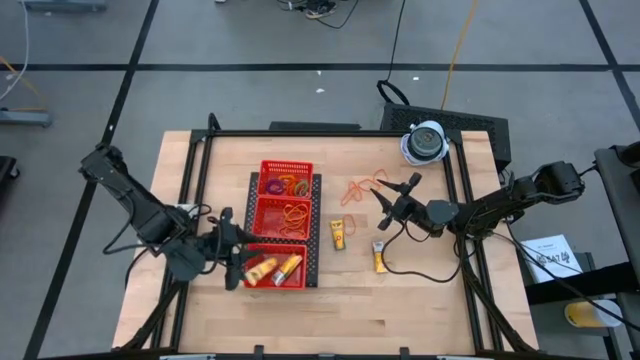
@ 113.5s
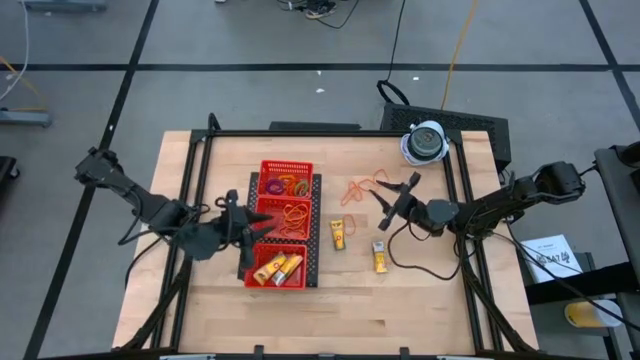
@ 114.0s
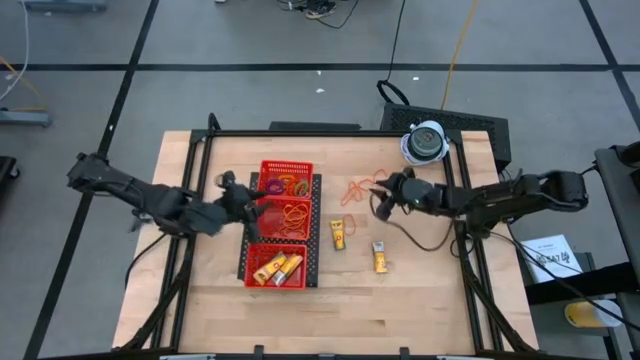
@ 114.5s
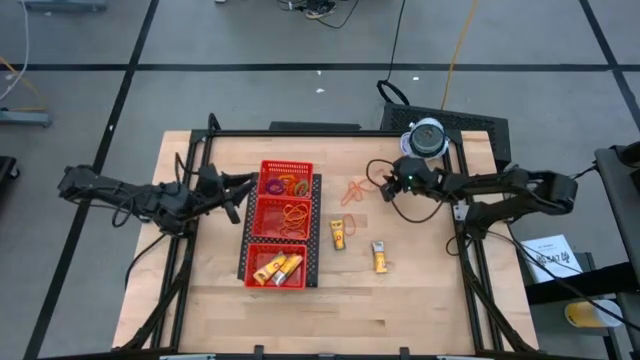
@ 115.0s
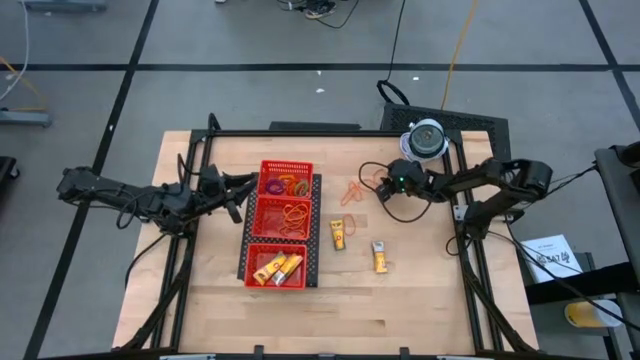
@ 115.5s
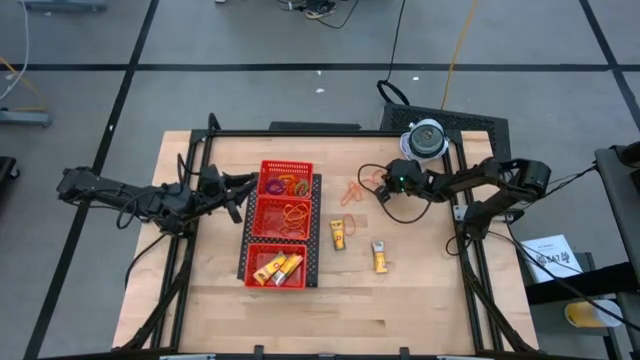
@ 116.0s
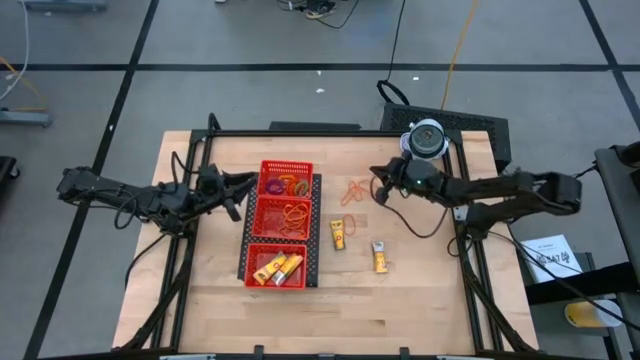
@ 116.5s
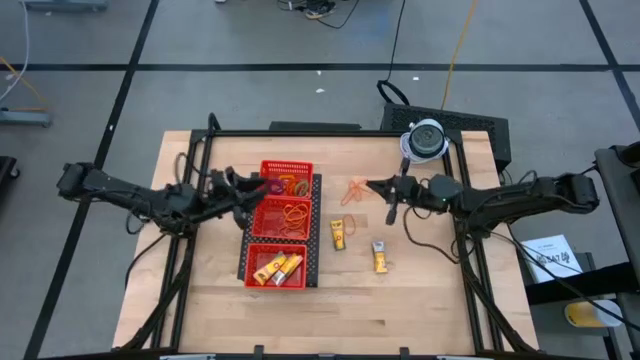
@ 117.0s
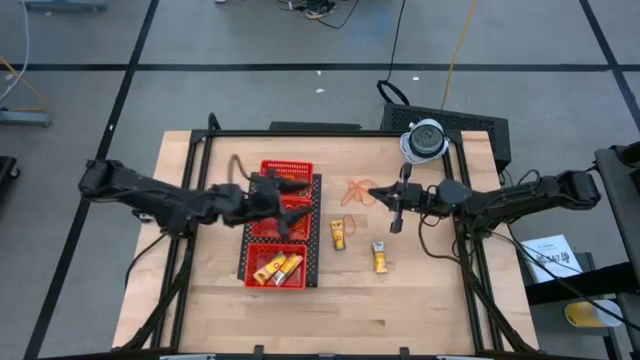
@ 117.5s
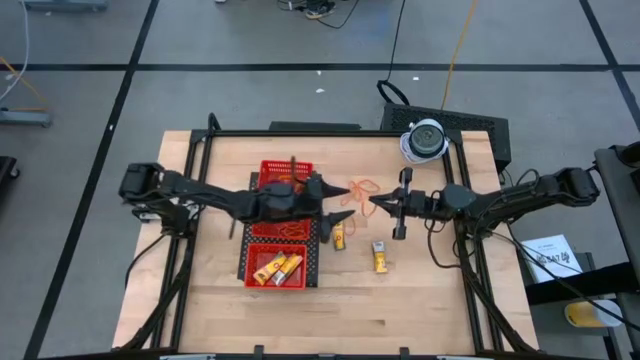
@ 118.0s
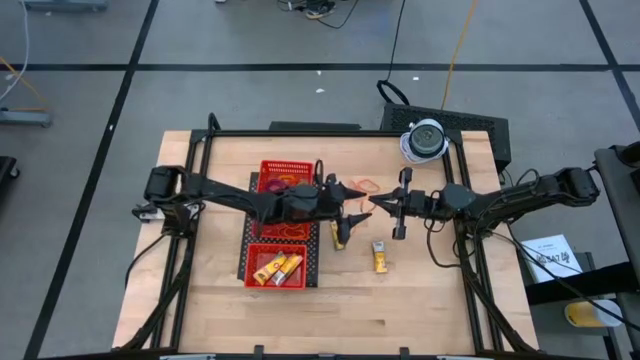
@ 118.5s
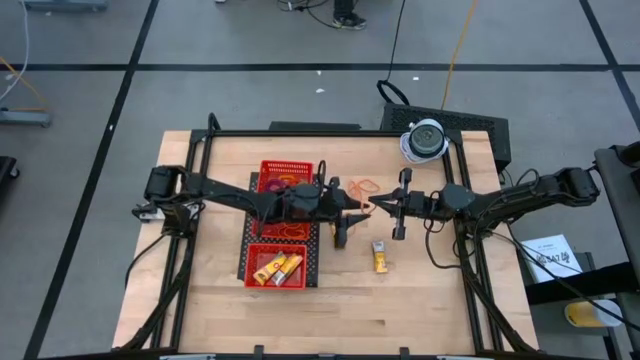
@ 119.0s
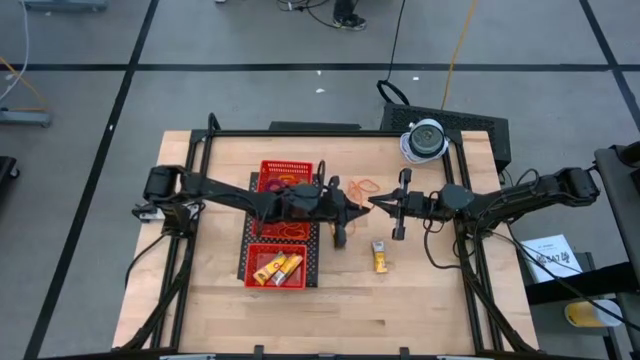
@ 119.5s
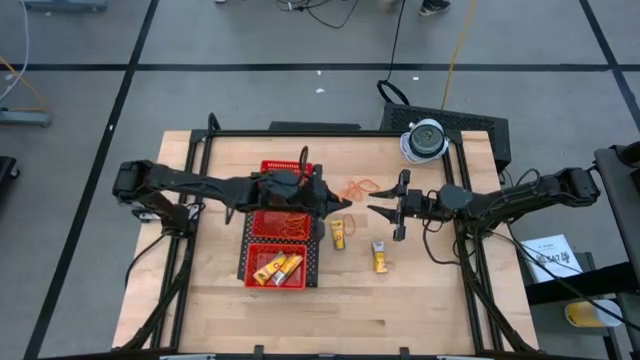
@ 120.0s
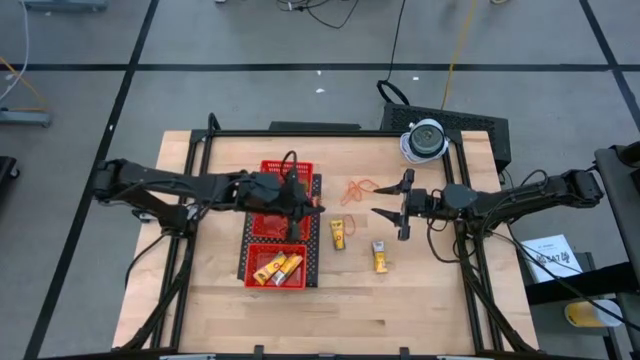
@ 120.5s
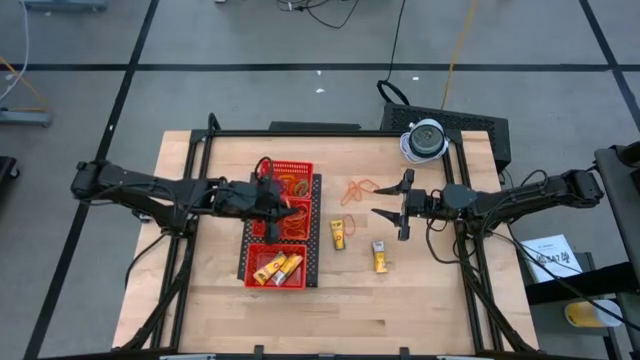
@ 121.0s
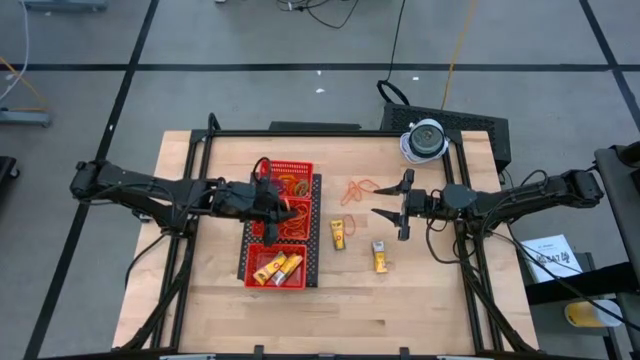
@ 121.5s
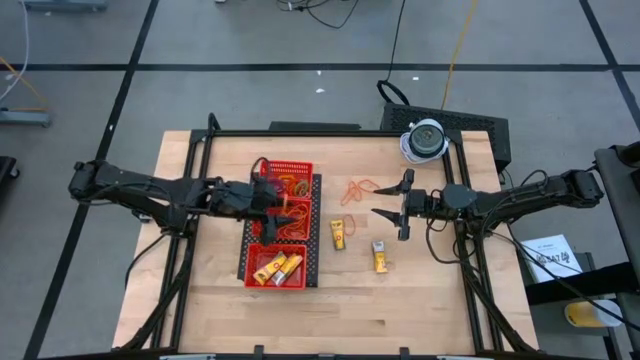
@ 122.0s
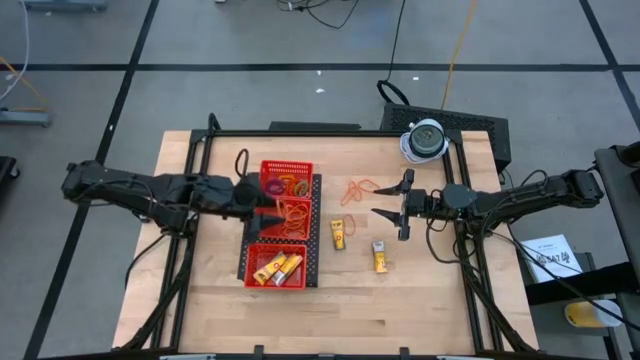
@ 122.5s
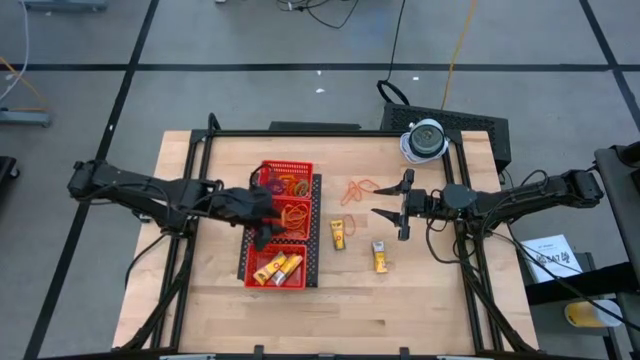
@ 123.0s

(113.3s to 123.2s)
Task: Pick & Place Office Desk Supplies
Put the orange rubber band into the middle red basket on the shelf

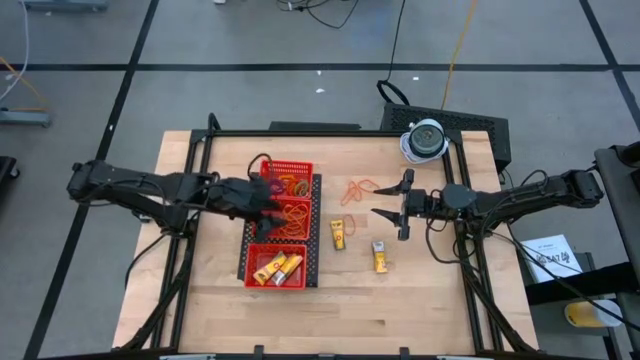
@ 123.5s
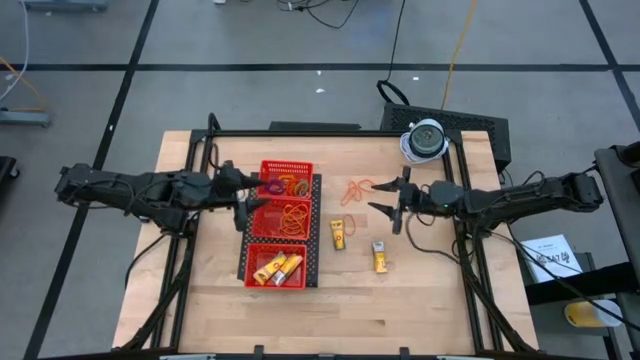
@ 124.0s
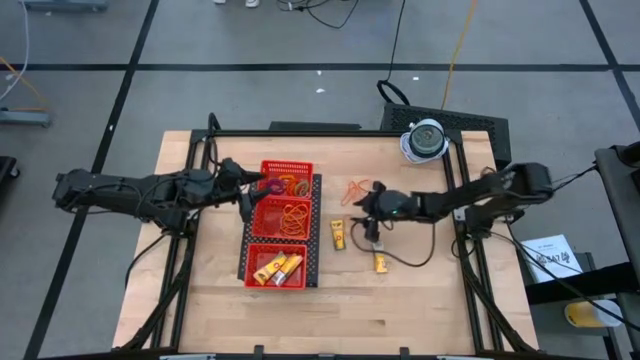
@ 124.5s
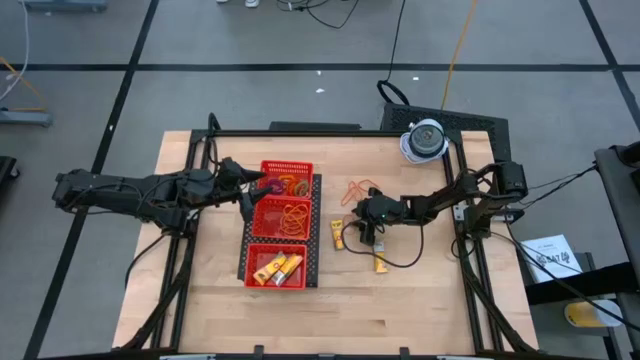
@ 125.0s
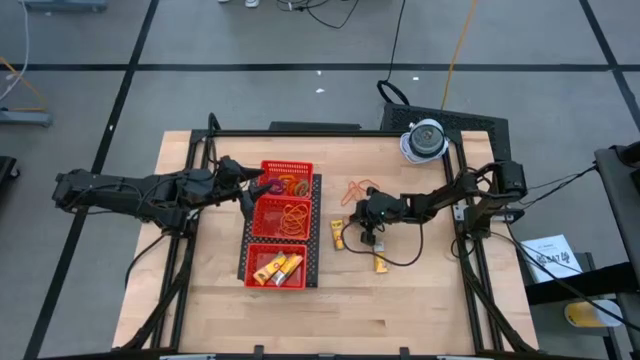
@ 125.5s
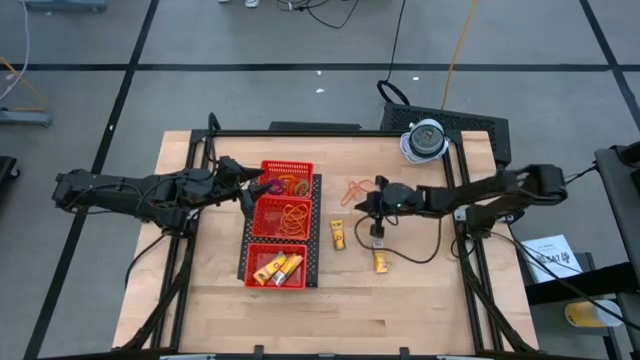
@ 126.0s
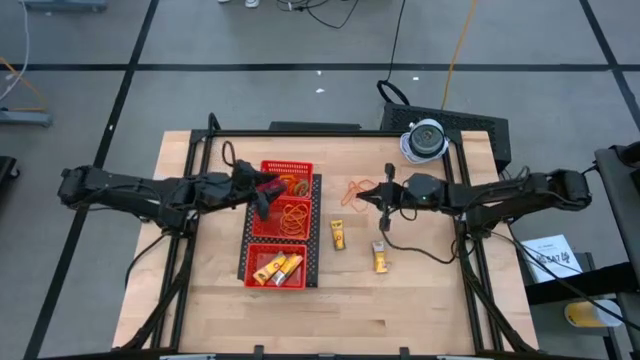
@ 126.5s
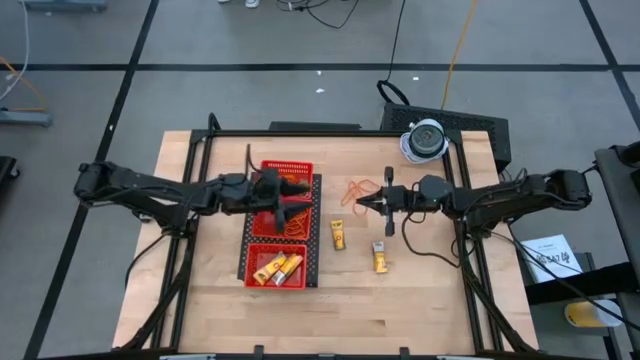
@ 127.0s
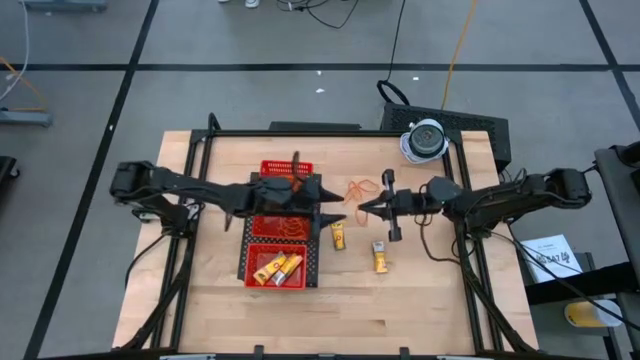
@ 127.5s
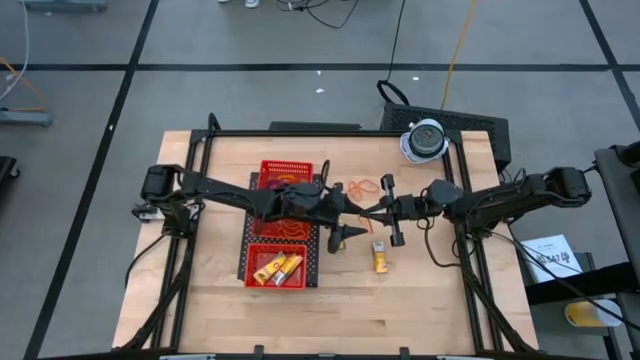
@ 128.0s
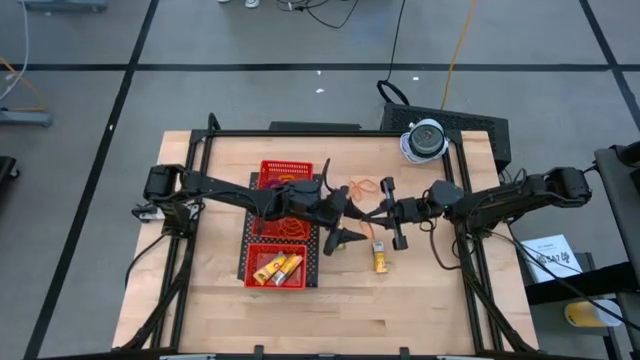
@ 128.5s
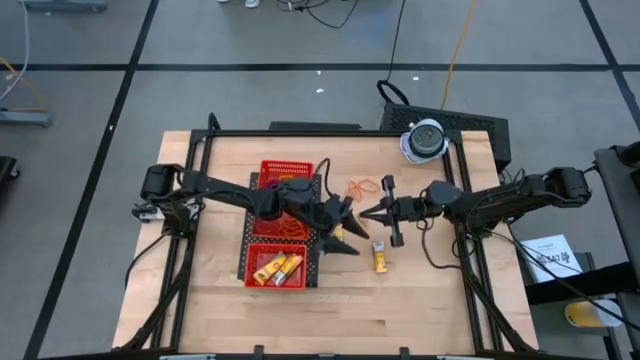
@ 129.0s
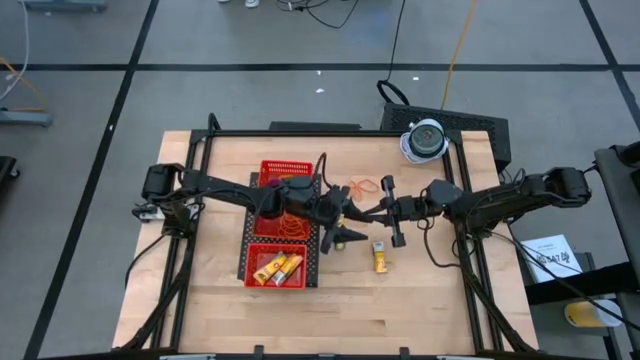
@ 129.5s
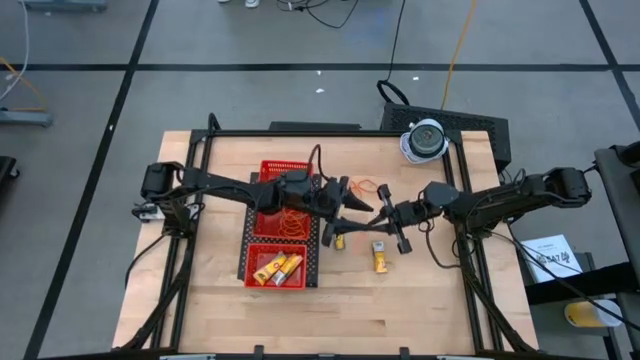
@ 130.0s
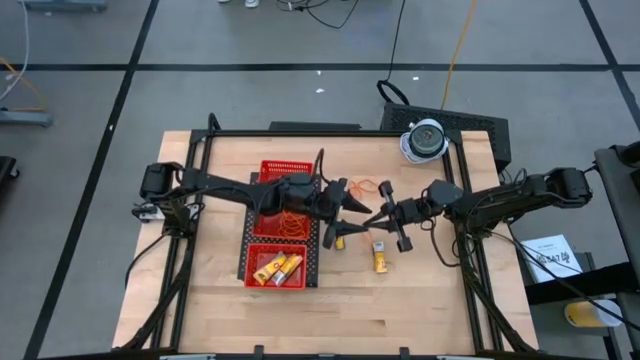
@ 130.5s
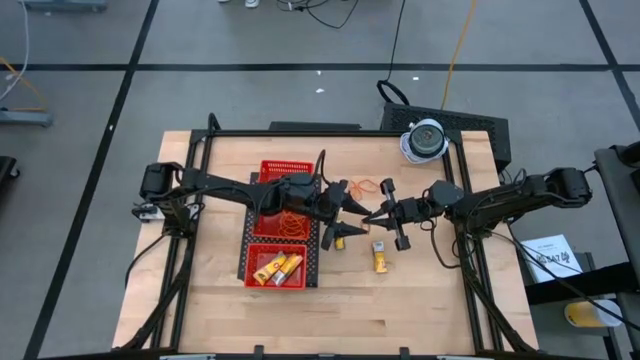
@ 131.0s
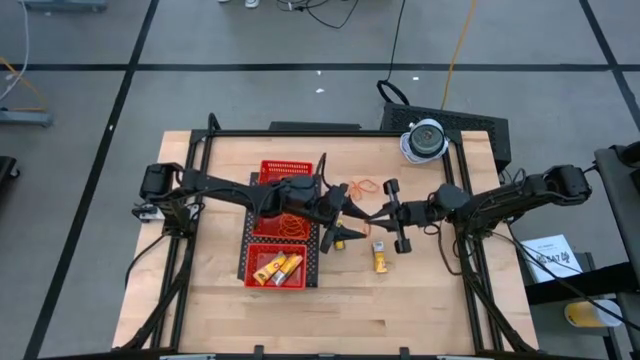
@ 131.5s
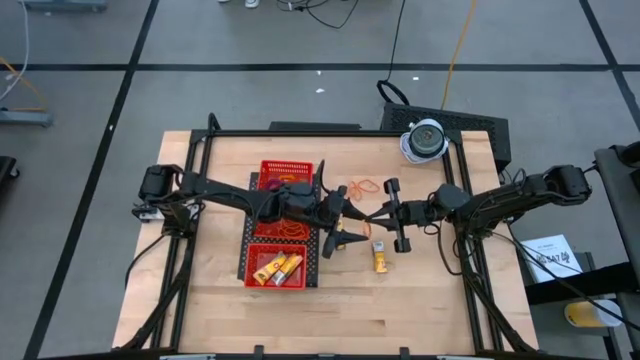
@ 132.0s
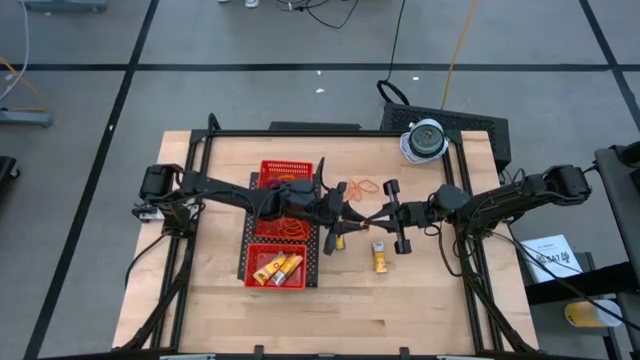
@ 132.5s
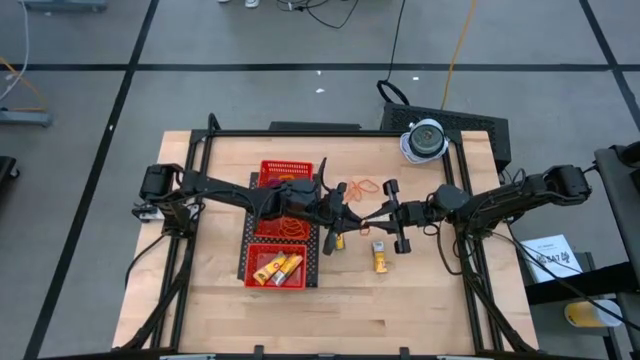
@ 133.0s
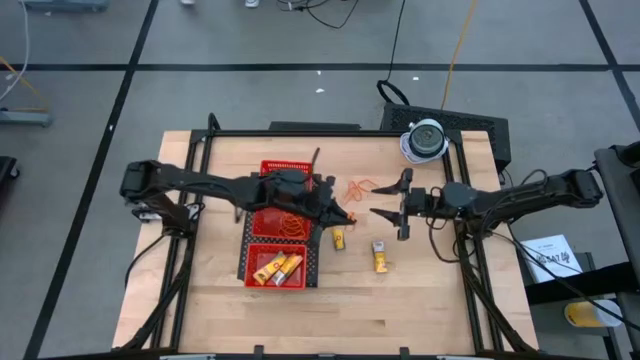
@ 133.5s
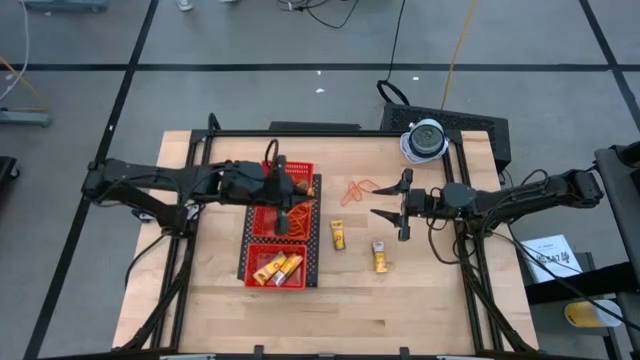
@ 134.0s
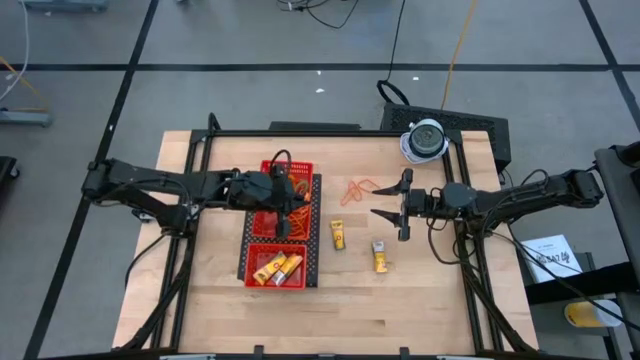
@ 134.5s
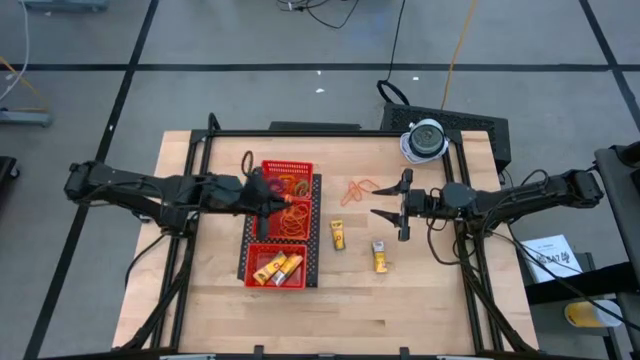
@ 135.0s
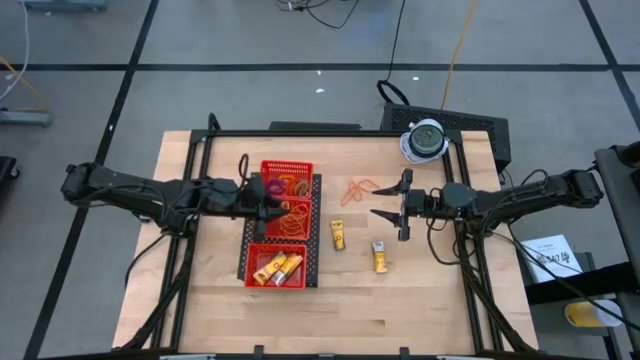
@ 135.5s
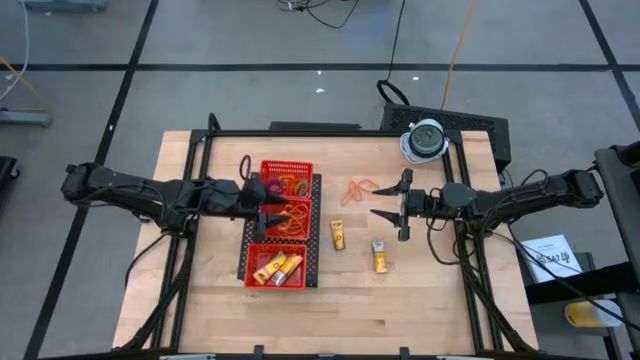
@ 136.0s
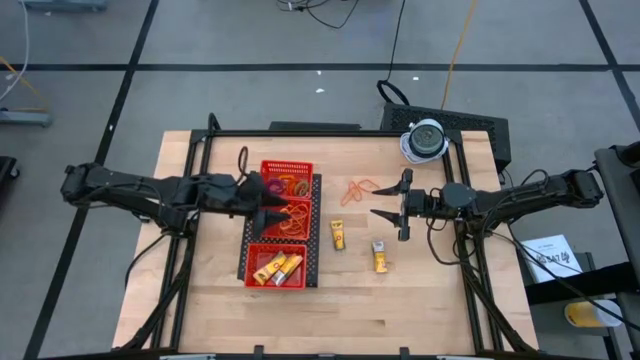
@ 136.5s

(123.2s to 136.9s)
Put the orange rubber band into the middle red basket on the shelf
